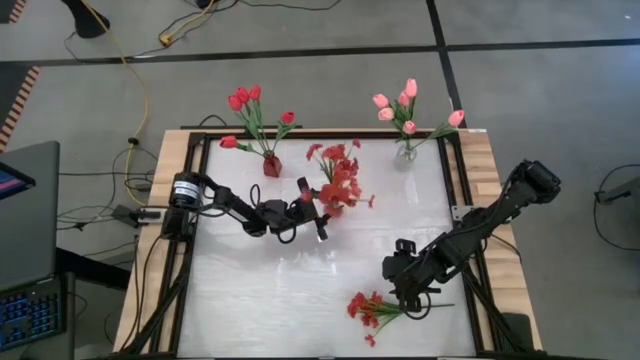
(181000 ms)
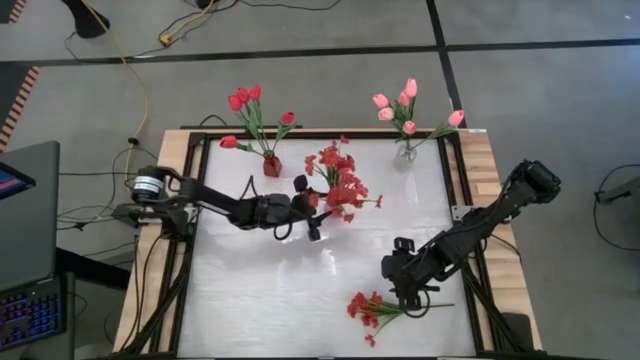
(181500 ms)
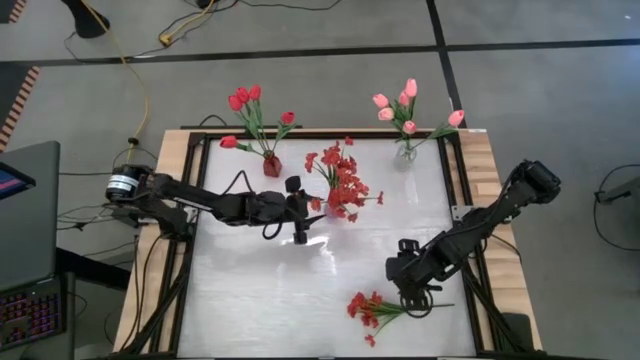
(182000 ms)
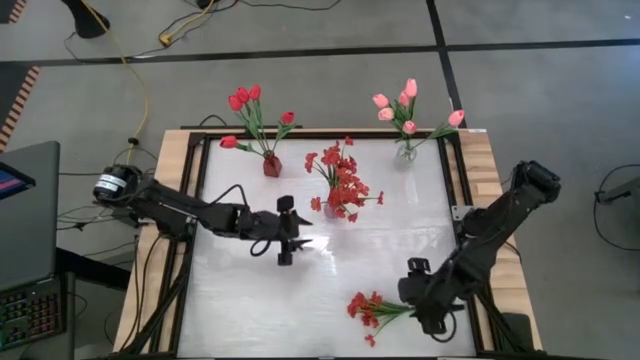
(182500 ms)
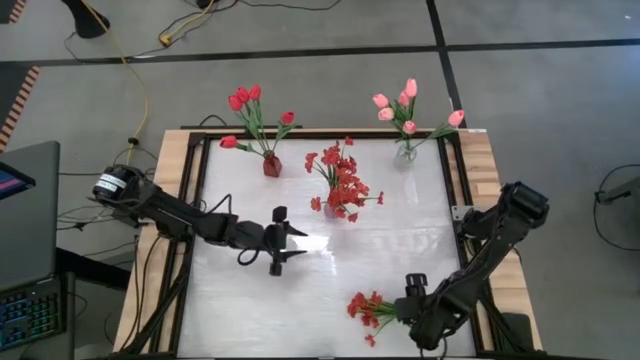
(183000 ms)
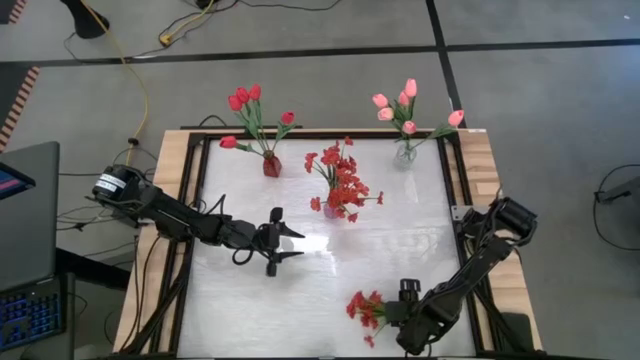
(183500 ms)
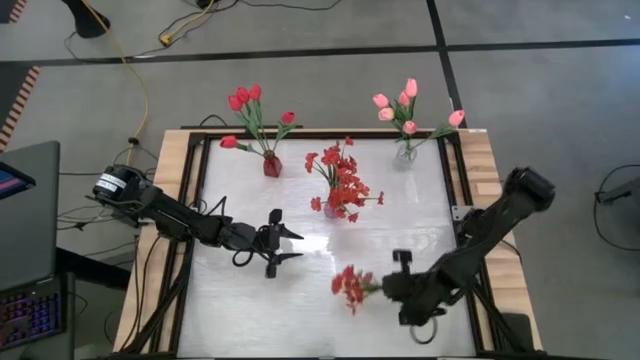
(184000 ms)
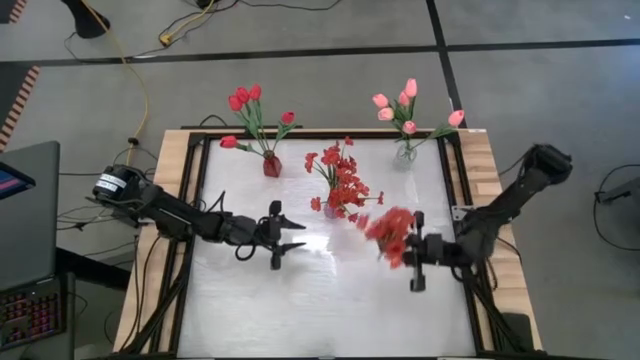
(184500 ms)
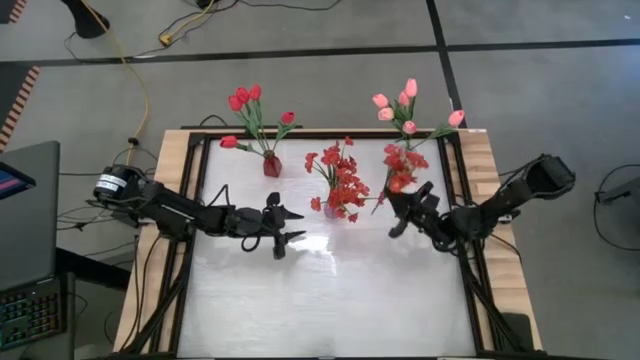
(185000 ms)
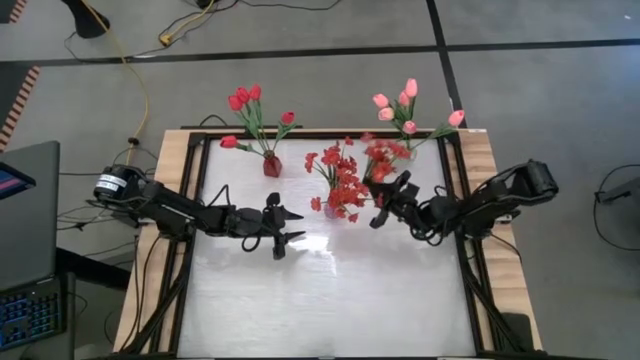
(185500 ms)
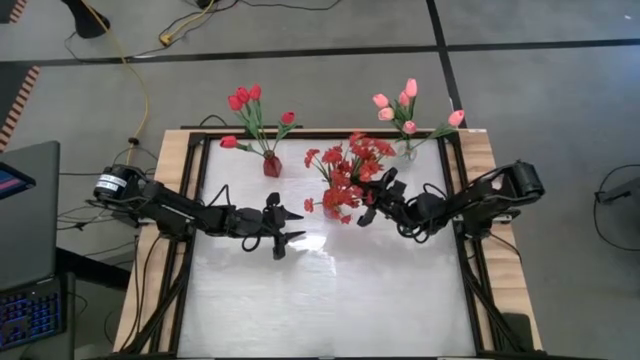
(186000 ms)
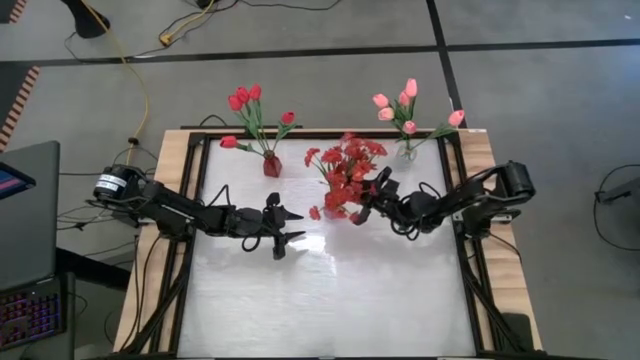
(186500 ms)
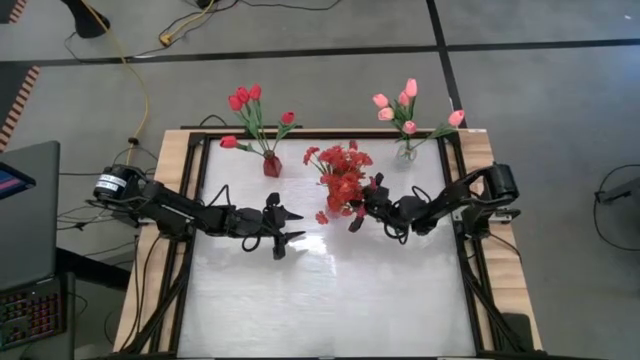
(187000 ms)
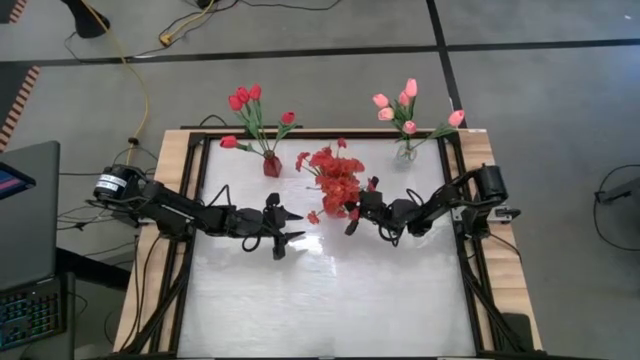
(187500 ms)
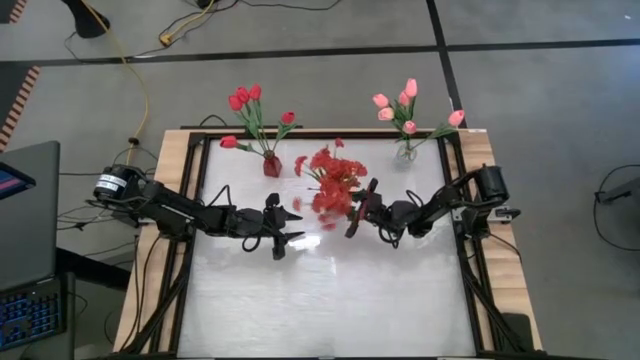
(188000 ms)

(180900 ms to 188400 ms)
Task: Sort flowers into vase by color
Put the orange flowers into the purple vase

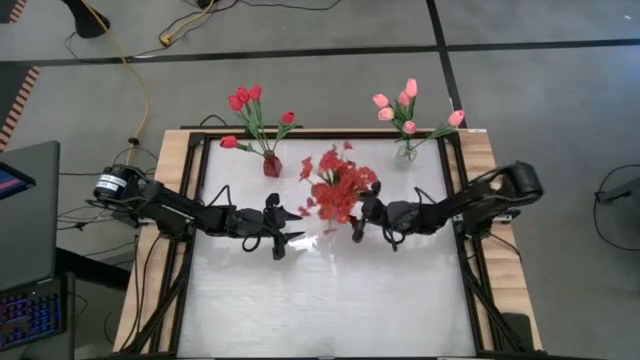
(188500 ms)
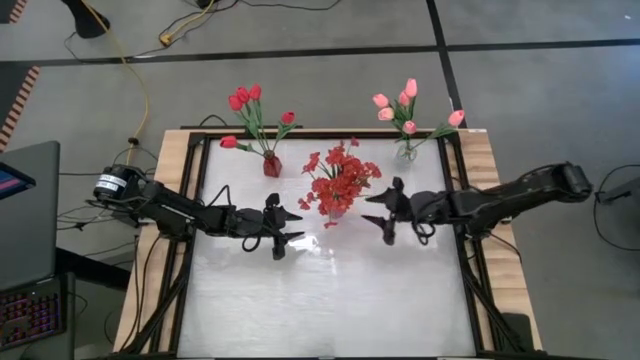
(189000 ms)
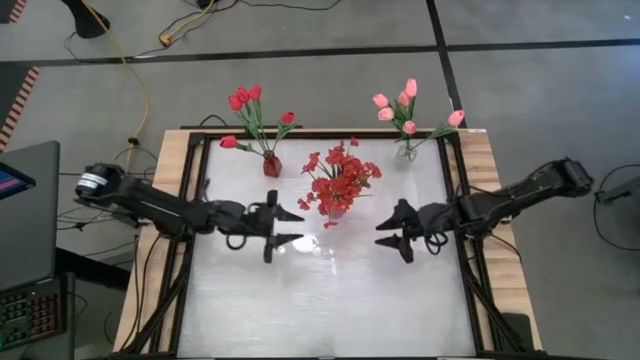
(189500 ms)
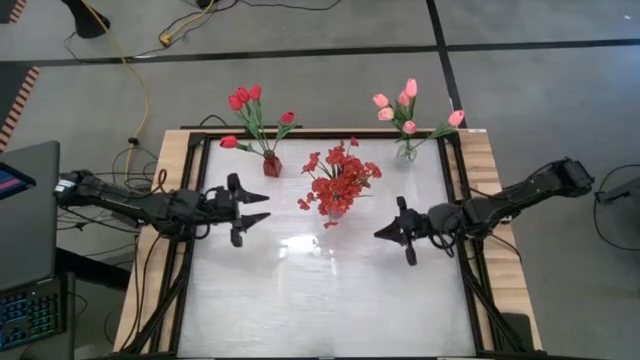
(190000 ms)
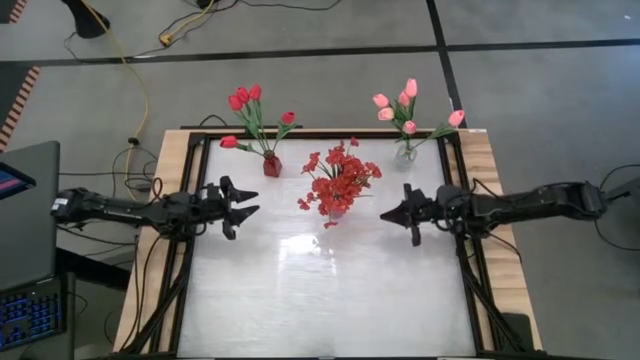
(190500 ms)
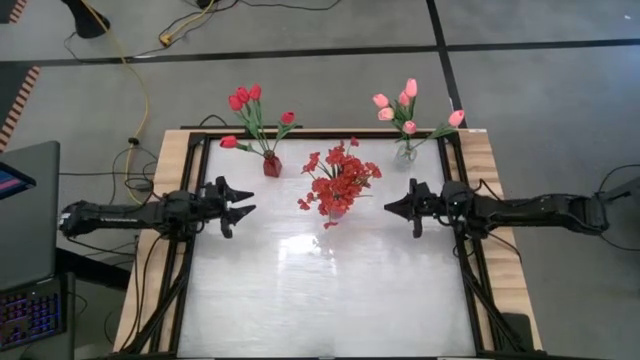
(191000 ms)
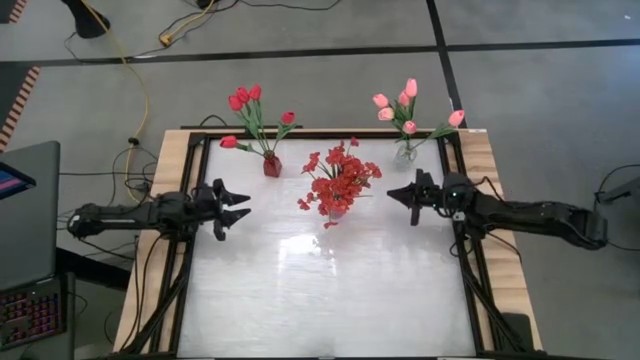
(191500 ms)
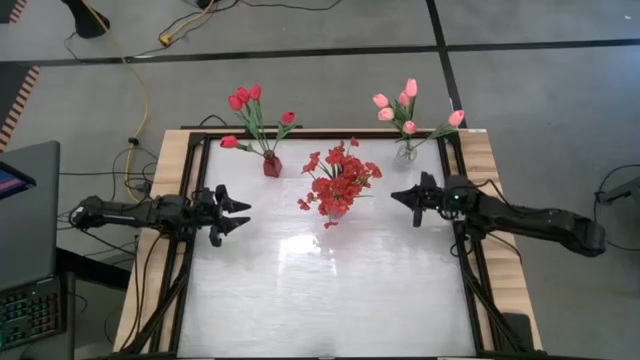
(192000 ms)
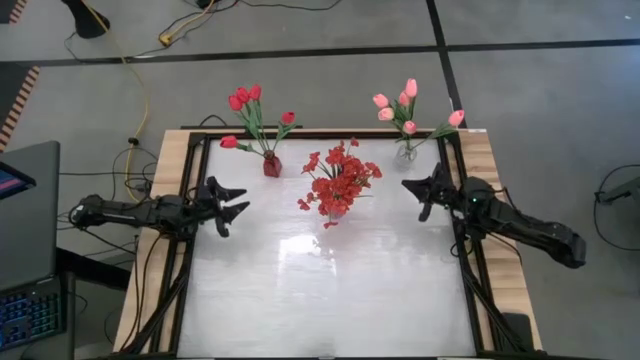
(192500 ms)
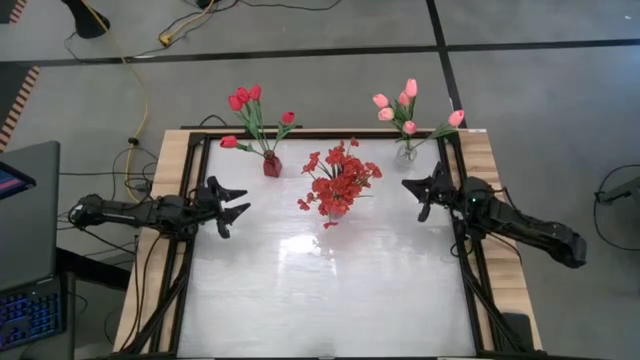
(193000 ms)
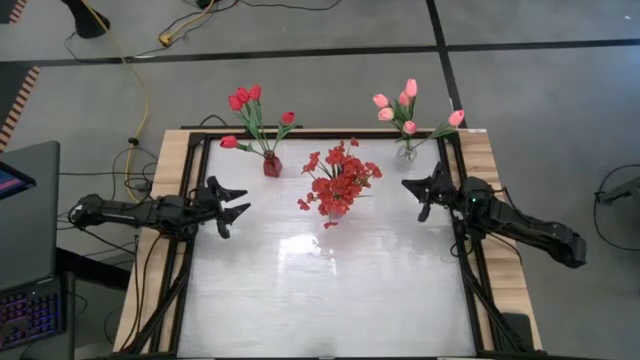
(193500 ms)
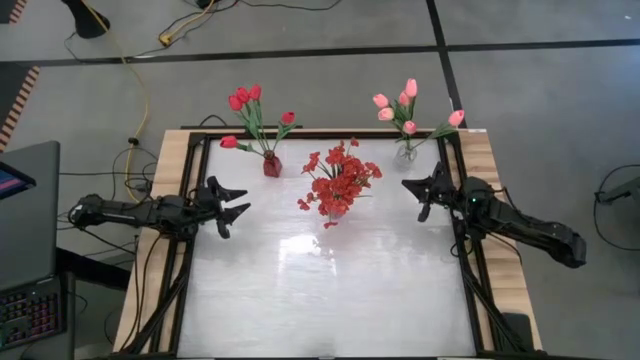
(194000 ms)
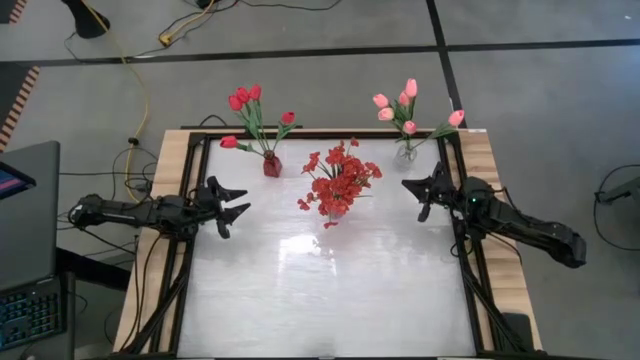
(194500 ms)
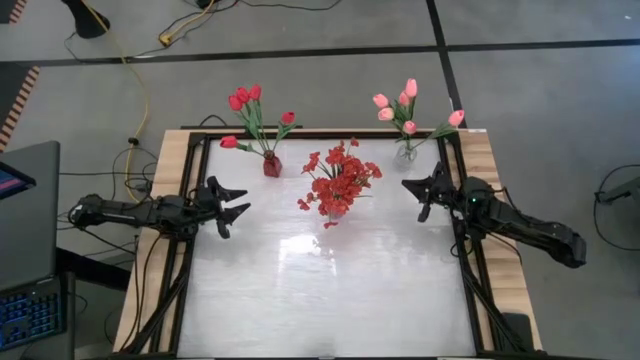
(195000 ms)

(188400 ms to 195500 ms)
Return to Home Position

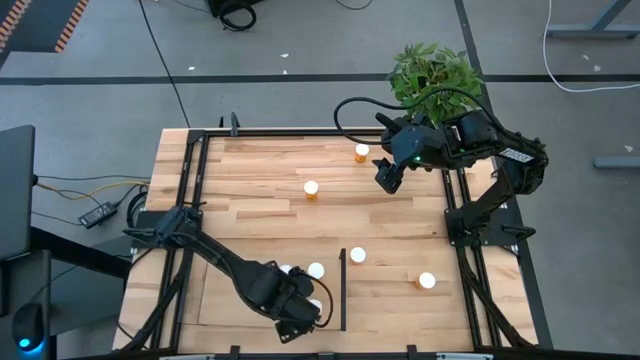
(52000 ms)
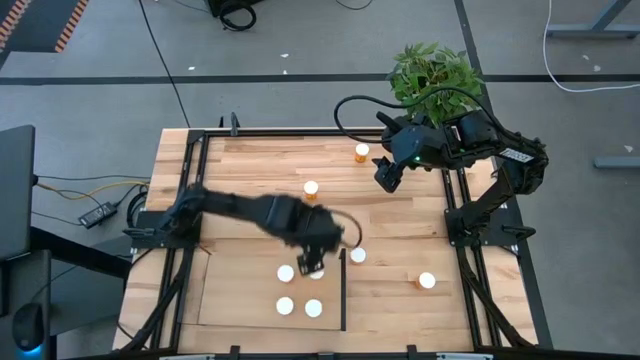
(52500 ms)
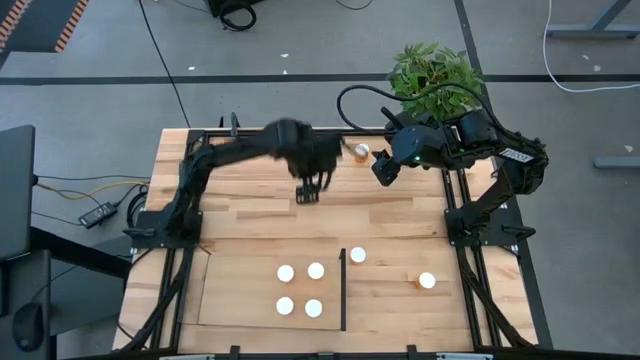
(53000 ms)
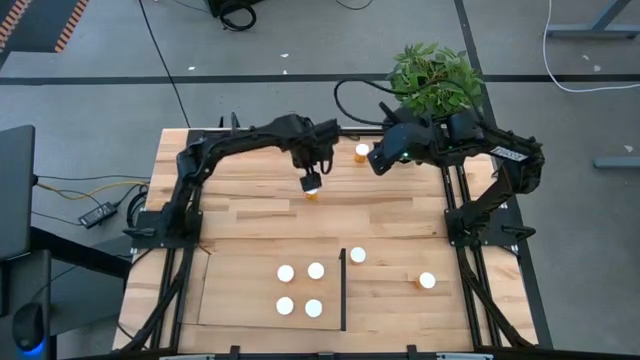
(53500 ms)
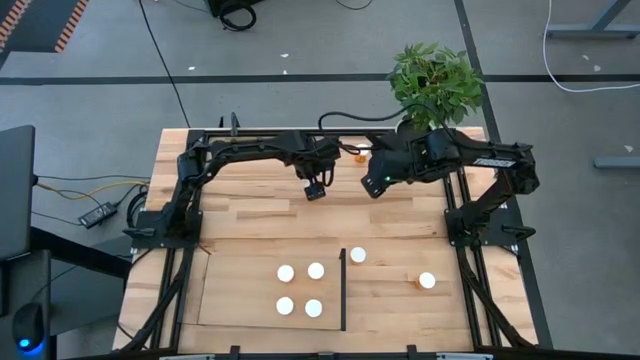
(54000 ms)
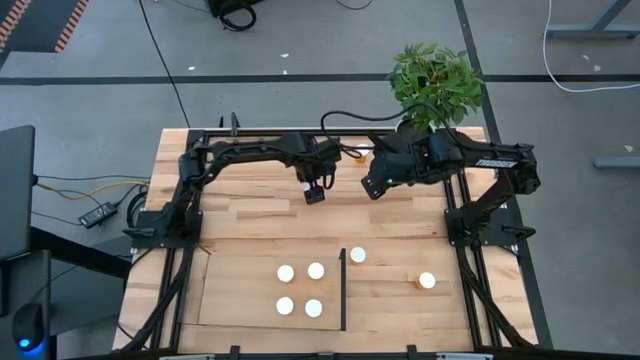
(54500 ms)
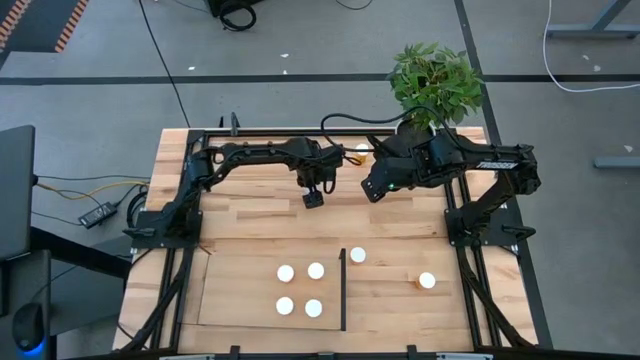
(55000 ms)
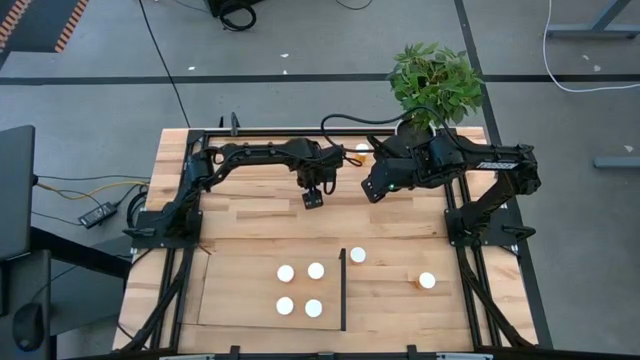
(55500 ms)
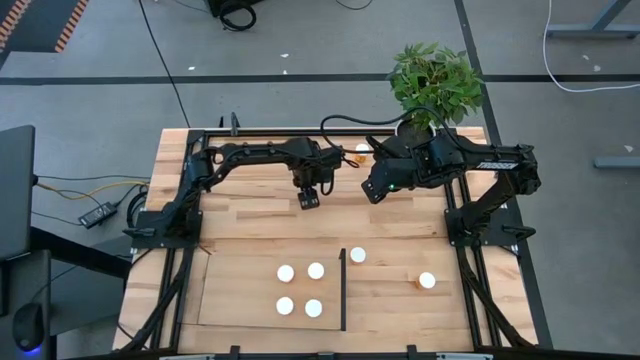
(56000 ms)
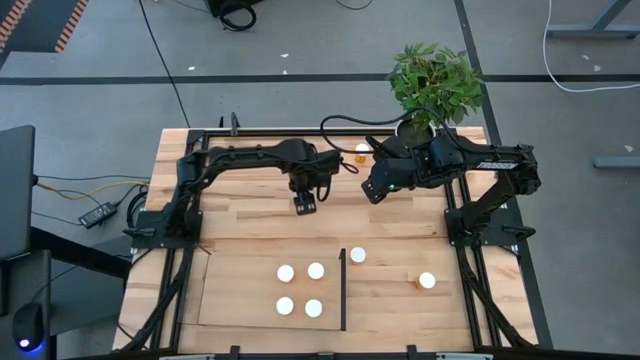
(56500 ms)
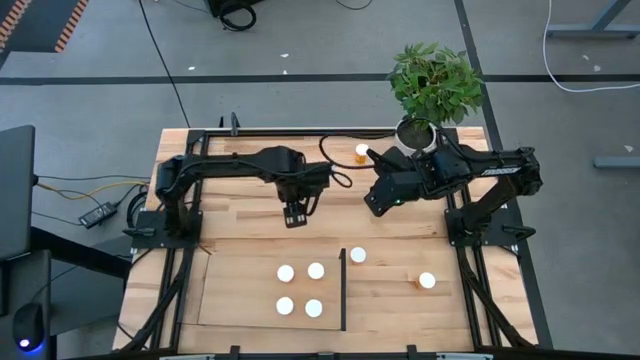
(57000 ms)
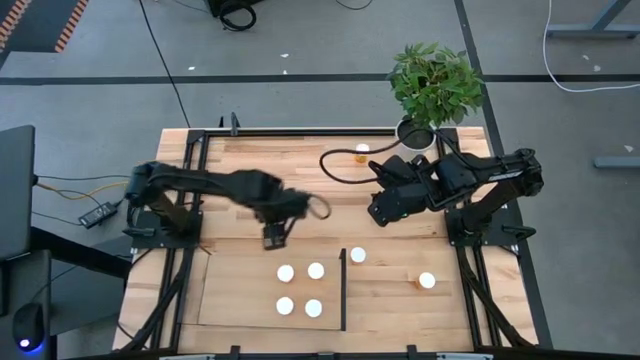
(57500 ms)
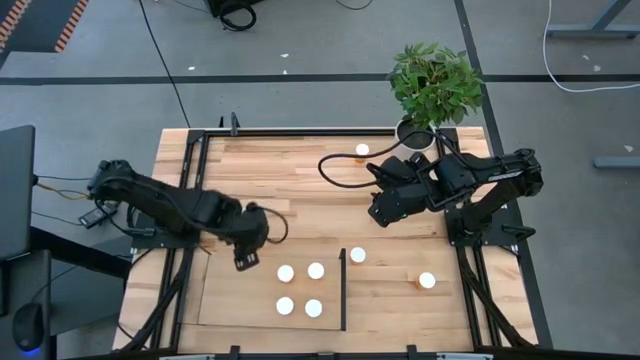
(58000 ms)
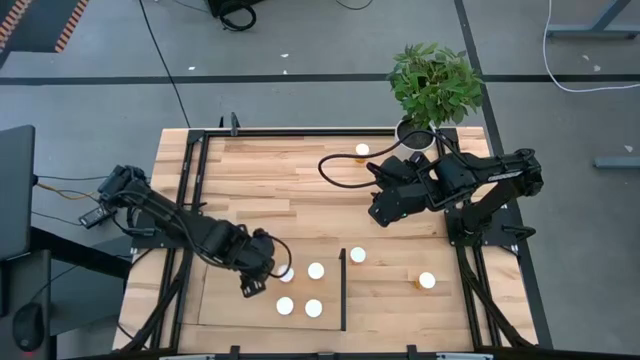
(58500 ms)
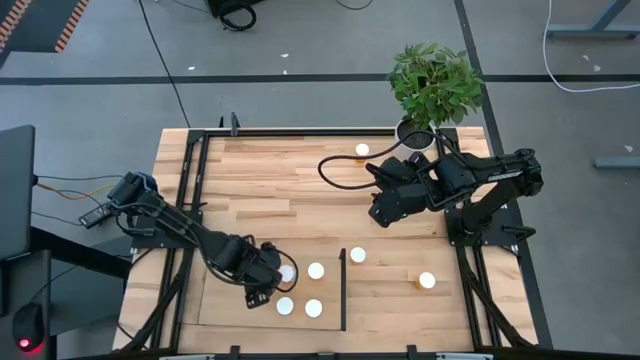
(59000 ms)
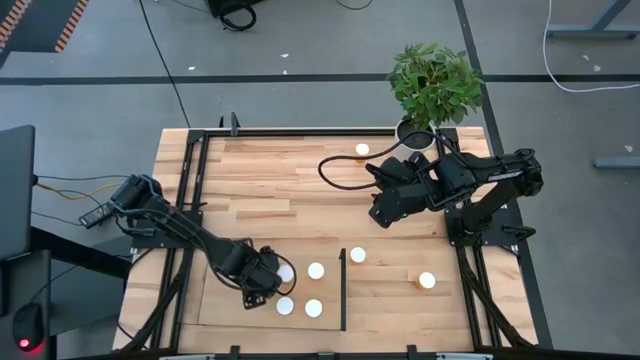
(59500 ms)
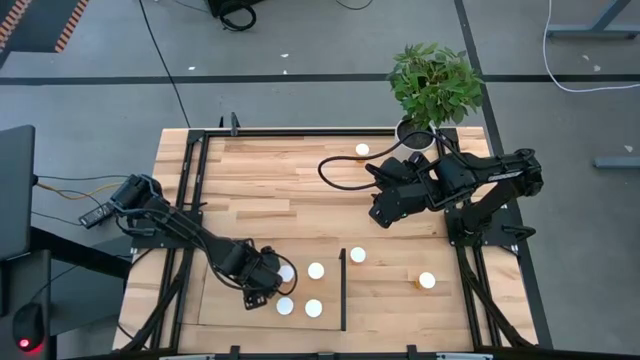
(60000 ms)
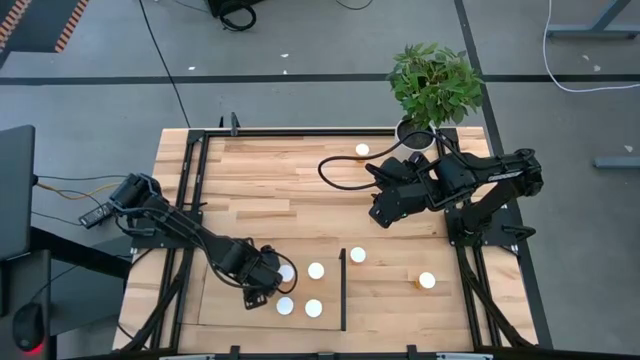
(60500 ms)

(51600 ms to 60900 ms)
Task: Pick and place medicine bottles onto shelf by color
Put the orange pill bottle on the shelf
